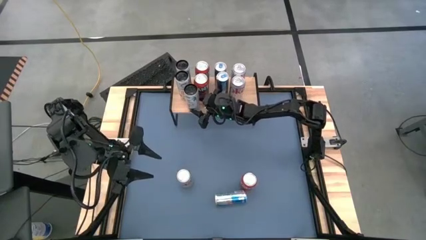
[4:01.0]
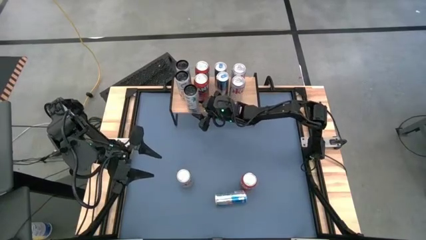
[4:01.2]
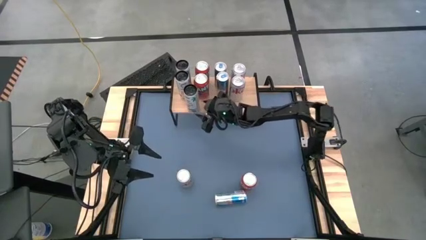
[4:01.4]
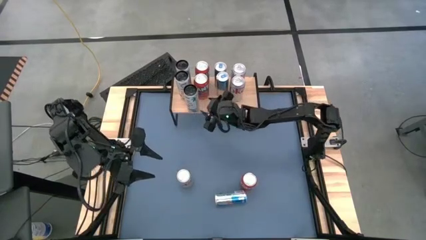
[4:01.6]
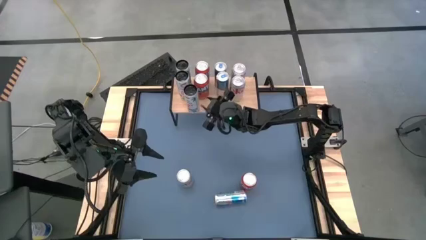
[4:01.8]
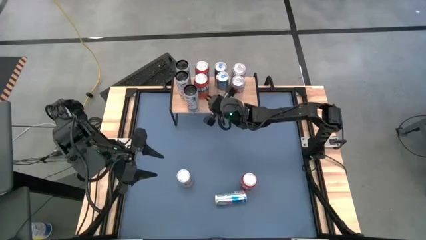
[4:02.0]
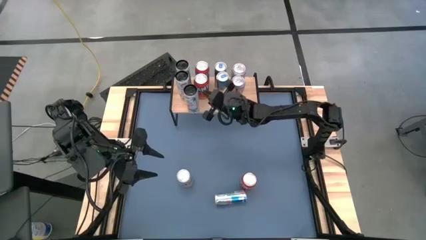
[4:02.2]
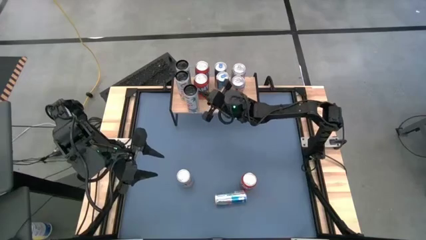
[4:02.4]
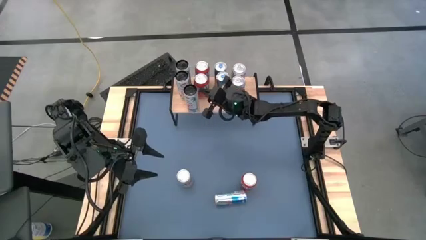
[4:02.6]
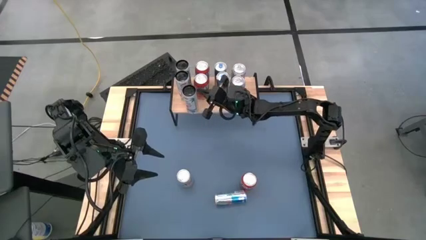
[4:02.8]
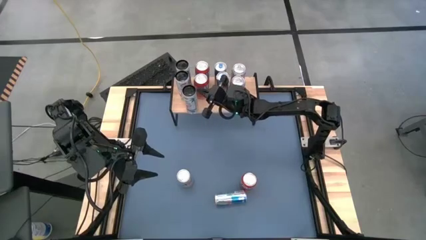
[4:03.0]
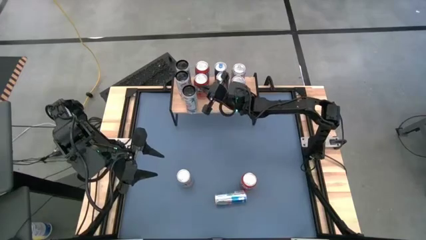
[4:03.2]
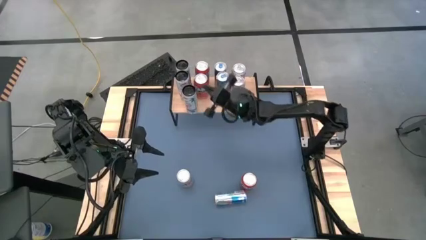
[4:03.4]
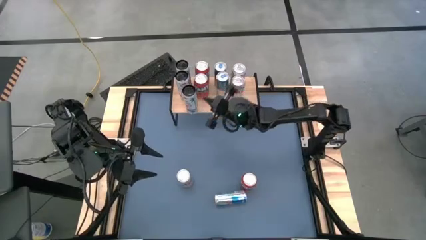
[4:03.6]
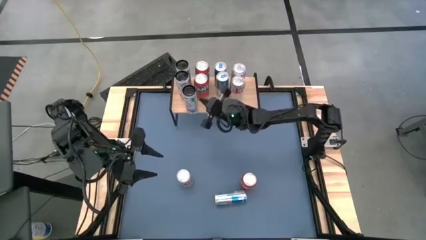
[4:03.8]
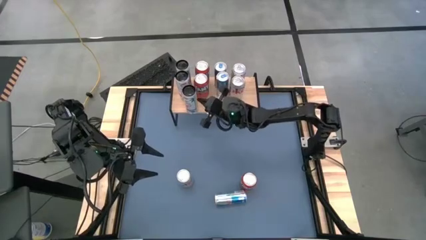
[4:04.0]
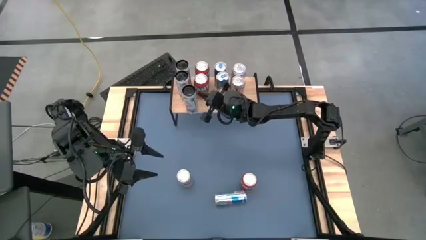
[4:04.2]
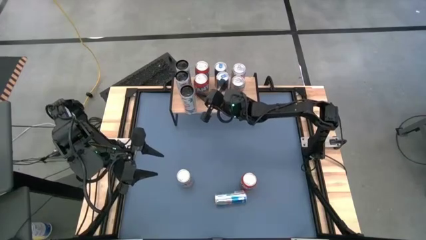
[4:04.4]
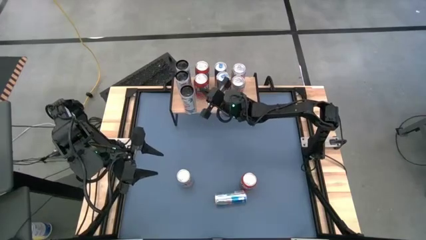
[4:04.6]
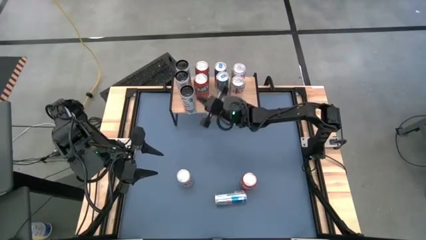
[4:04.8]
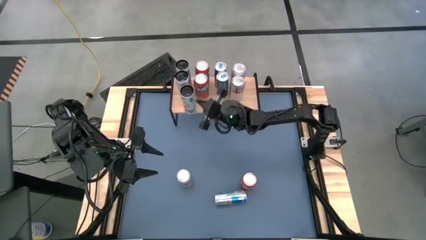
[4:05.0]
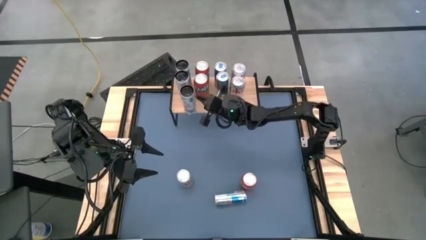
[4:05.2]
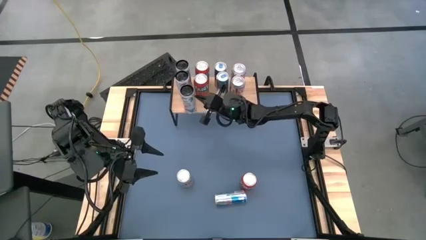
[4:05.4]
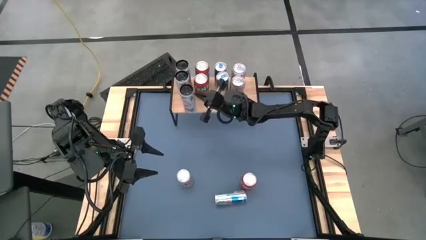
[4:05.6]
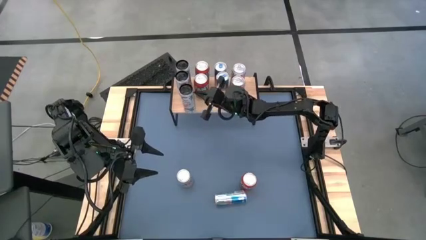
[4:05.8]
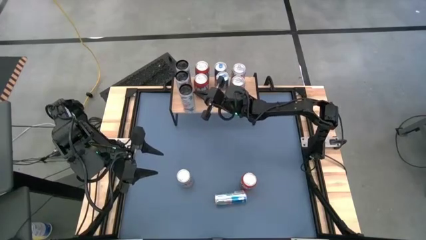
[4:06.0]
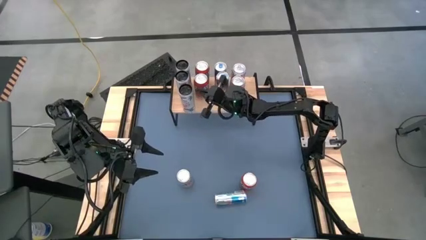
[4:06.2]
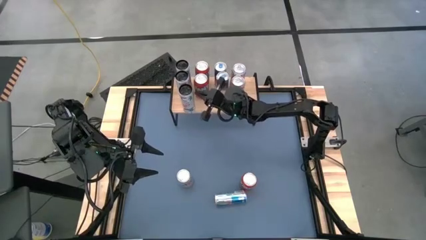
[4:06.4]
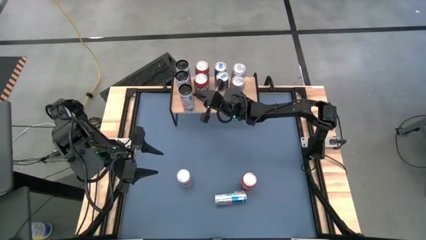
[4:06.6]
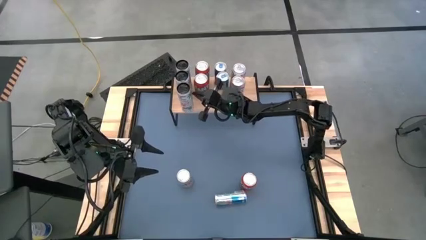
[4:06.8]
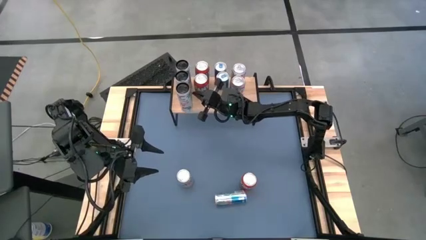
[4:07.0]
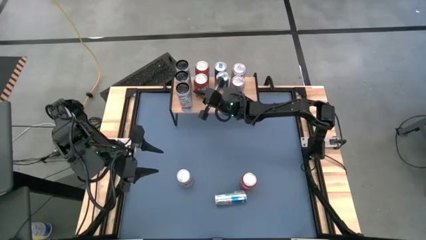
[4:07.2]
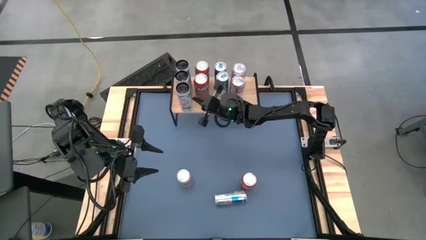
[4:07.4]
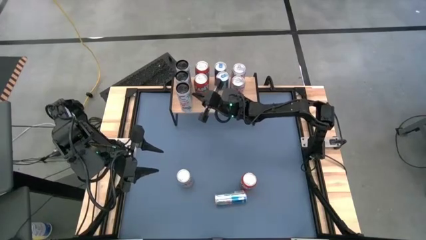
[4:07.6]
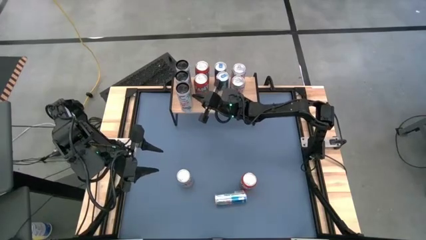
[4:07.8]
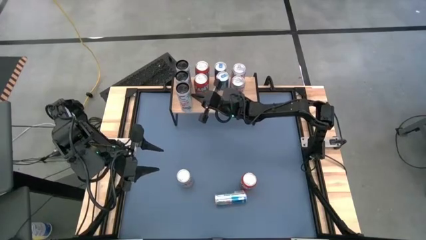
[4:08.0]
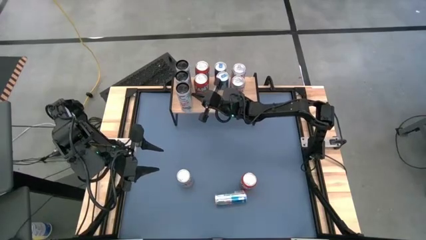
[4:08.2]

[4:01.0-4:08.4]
Task: Place canned beverage on shelf
Adjust the black soda can

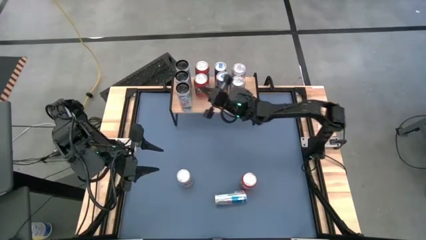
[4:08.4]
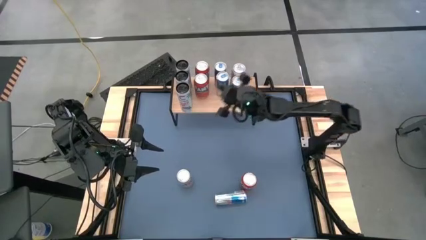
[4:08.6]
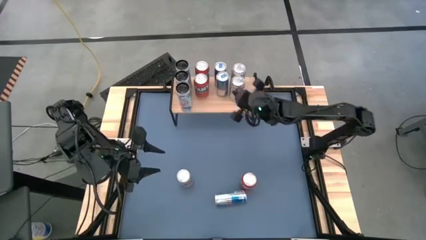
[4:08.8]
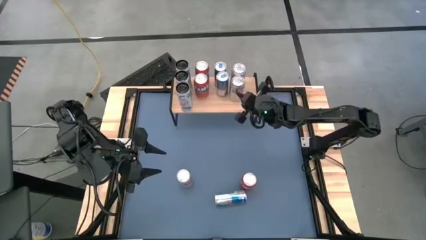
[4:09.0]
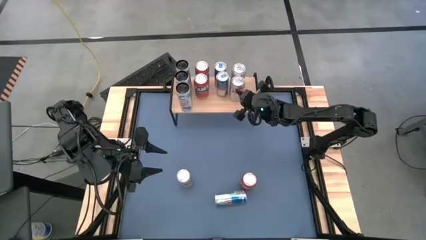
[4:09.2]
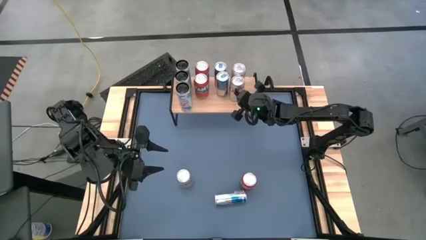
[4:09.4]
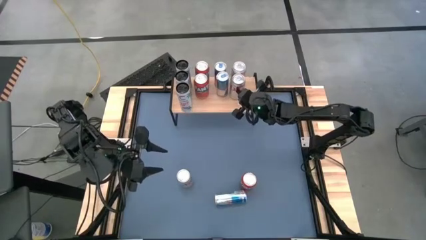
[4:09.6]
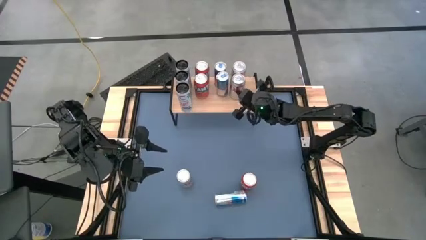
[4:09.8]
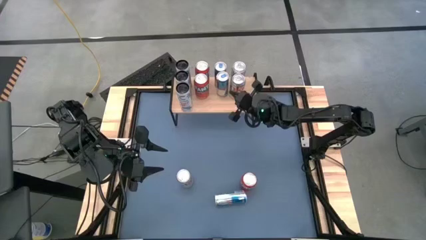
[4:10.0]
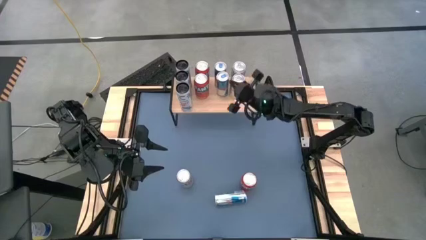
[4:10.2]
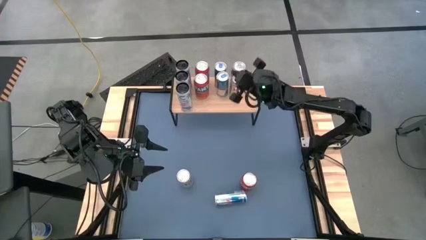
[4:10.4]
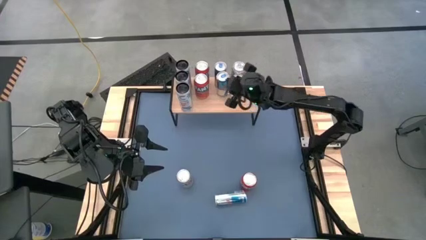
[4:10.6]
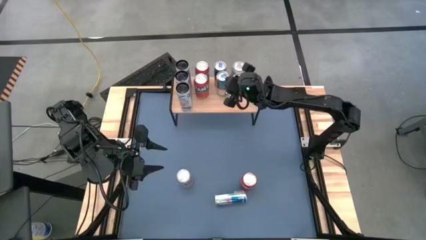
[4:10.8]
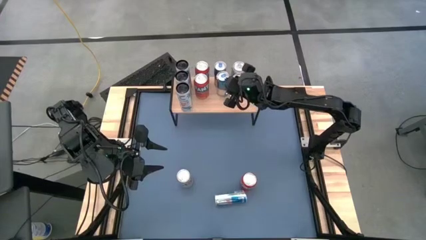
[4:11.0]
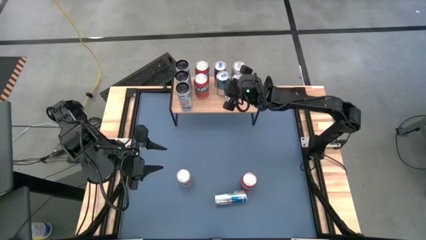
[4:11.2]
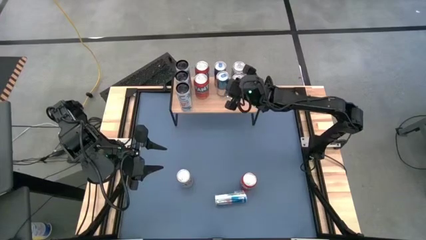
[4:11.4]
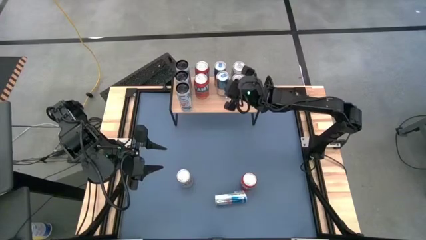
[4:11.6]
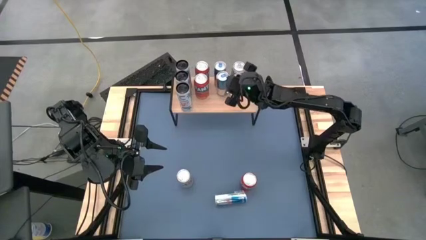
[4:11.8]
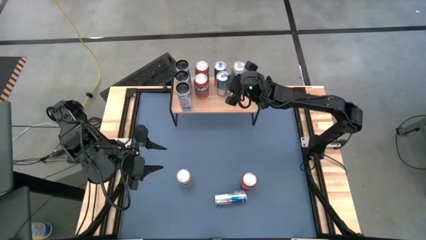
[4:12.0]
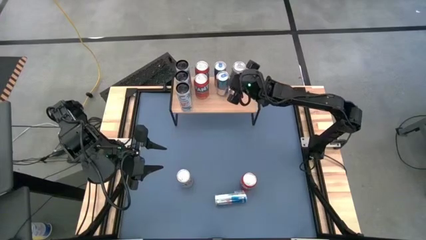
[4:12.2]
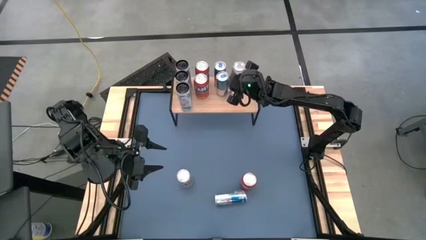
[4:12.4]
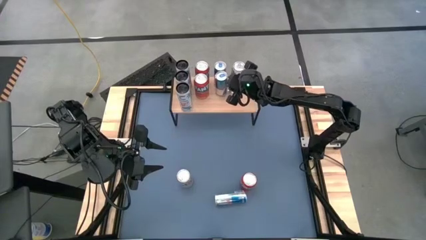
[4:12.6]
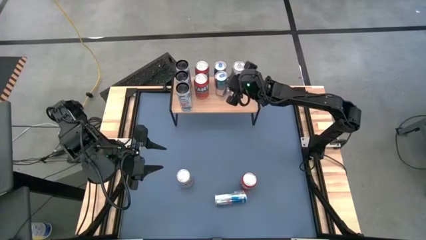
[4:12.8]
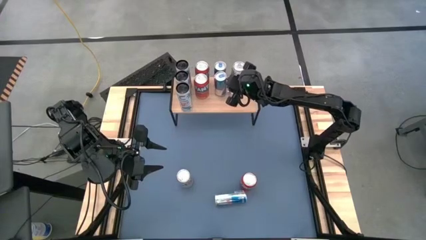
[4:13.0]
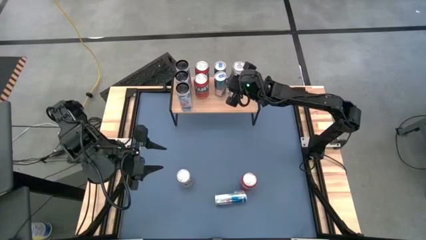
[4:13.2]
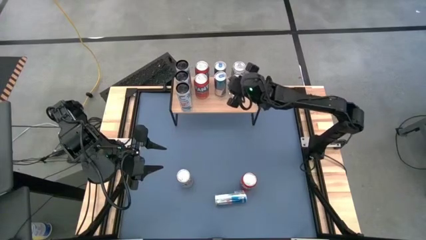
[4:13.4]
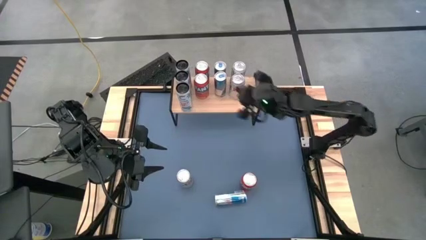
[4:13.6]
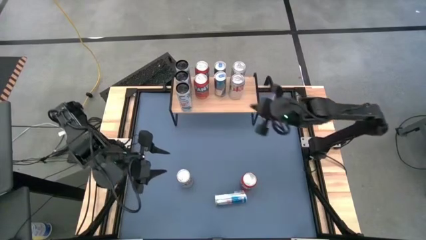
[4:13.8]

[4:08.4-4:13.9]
Adjust all the soda can on the shelf

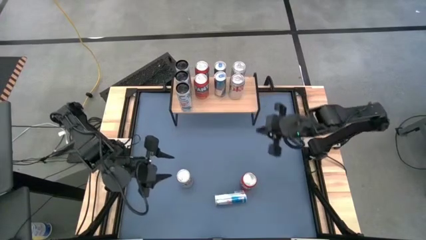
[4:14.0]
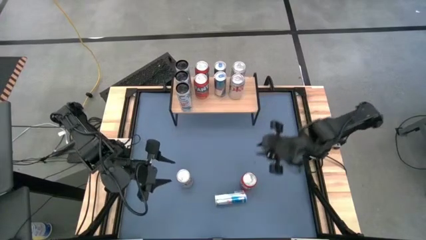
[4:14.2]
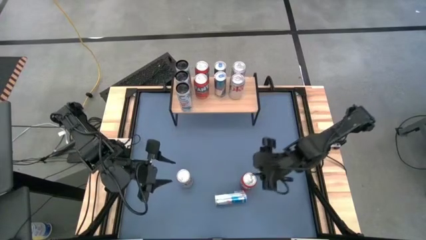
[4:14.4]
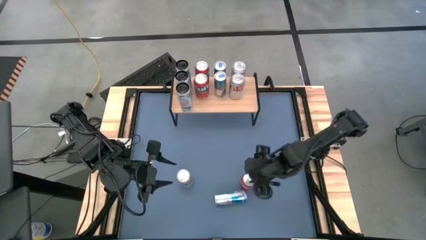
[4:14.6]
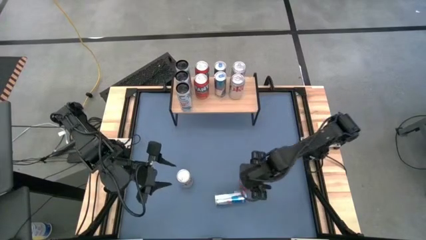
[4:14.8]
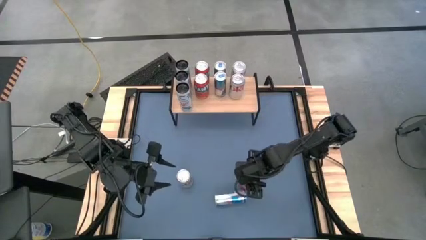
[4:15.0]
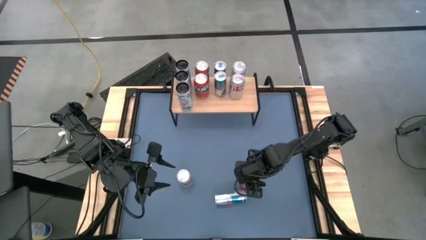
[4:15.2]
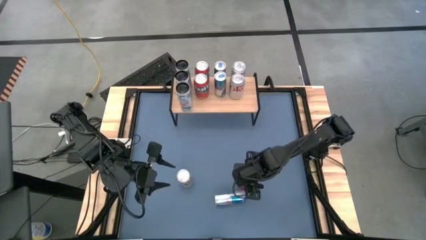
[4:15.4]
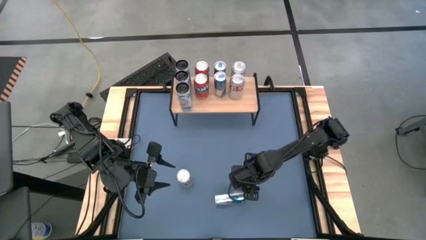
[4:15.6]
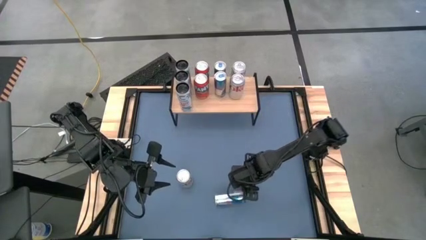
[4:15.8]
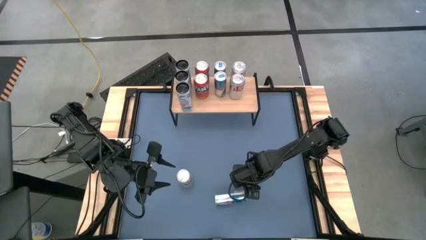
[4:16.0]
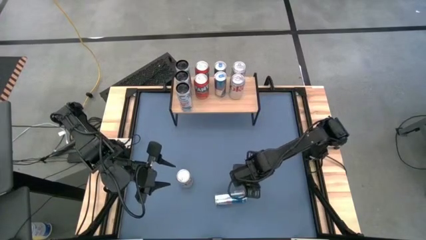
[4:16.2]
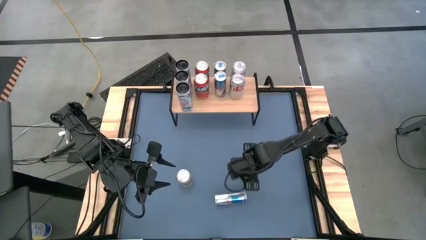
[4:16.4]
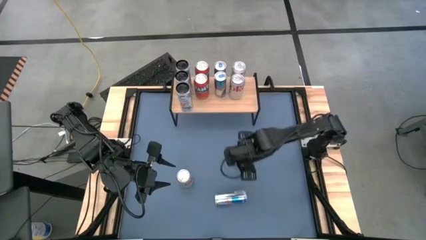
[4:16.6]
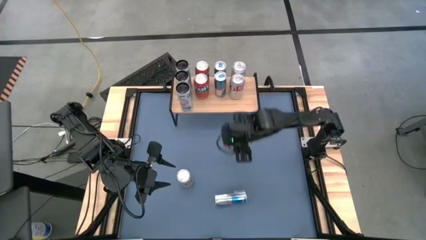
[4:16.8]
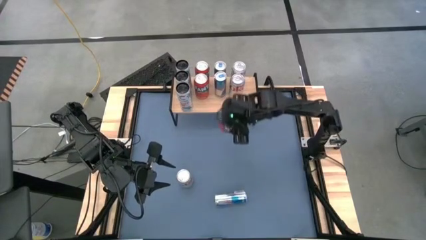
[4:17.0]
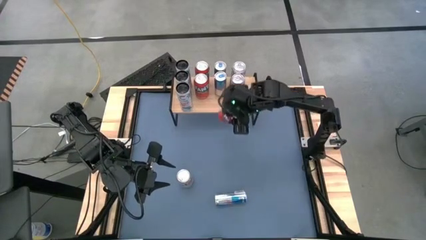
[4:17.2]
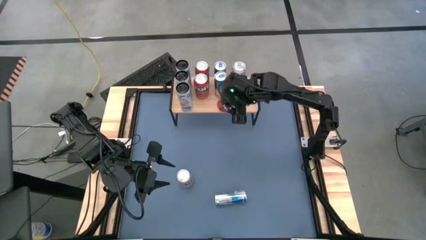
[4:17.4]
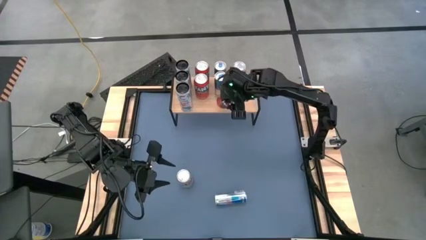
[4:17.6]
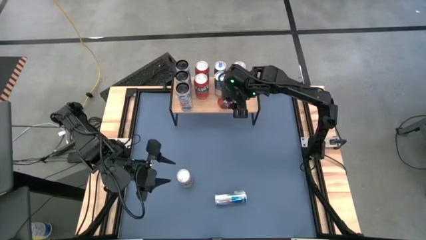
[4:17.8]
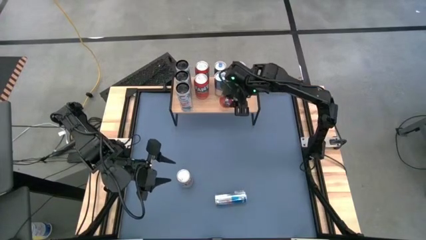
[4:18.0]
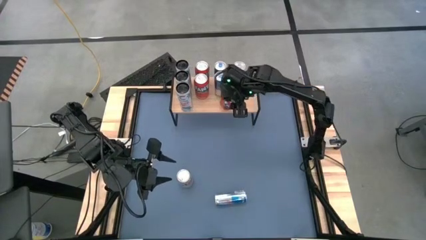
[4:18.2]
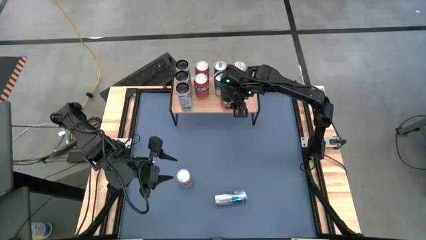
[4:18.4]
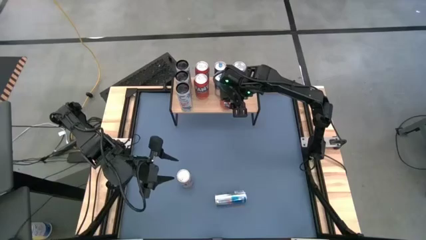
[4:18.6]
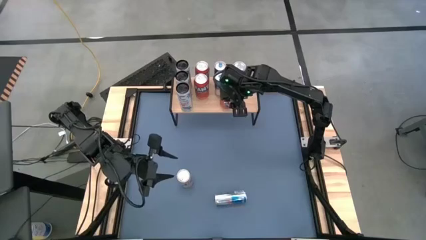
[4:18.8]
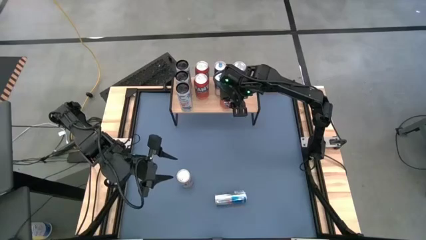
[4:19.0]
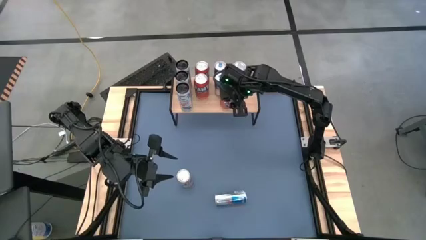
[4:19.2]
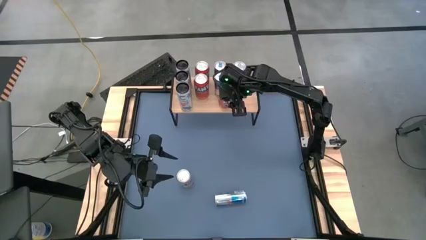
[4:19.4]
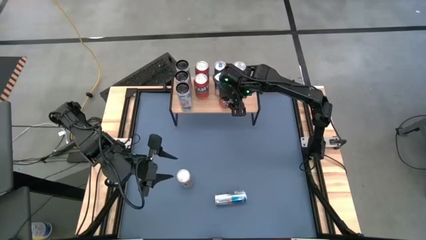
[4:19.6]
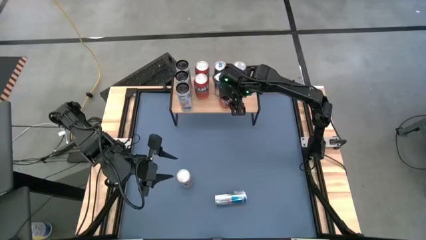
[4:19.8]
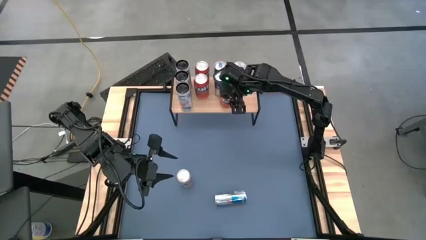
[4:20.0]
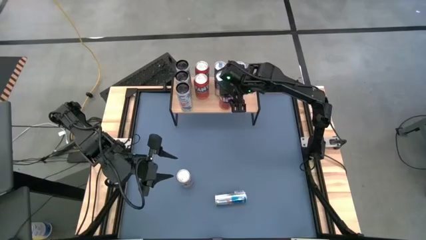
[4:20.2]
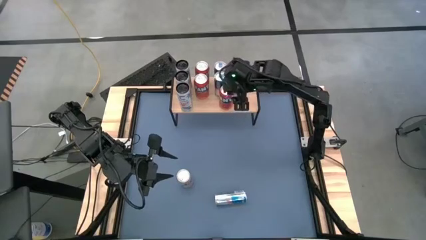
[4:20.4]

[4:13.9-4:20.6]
Put the orange soda can on the shelf
